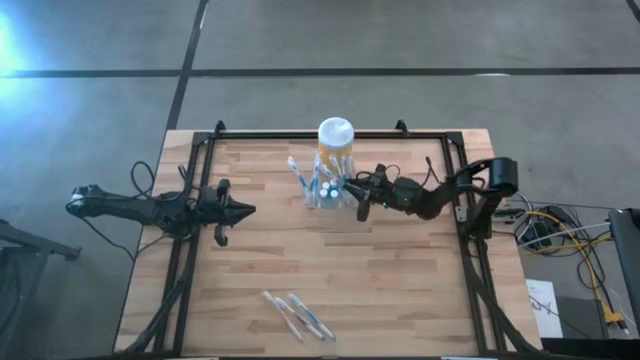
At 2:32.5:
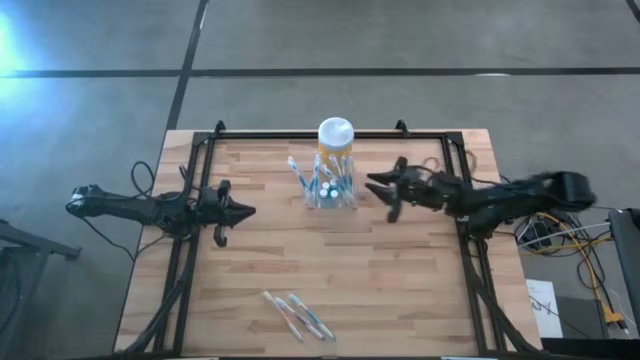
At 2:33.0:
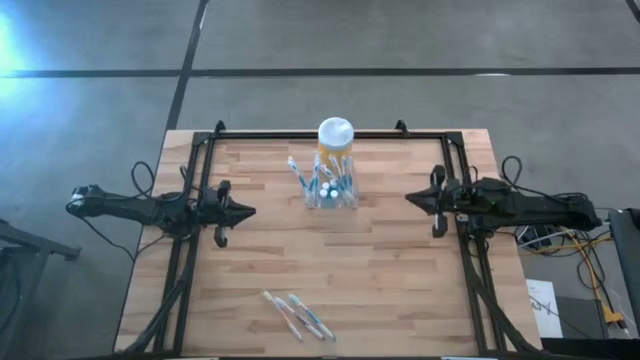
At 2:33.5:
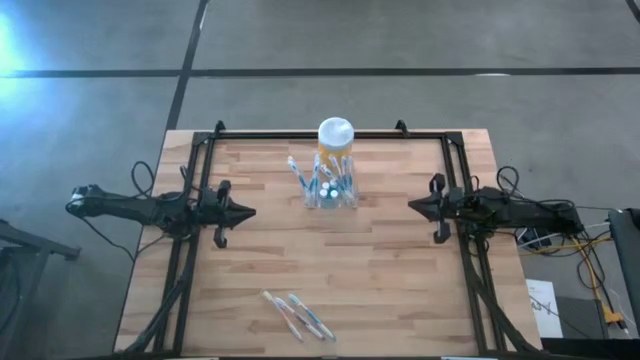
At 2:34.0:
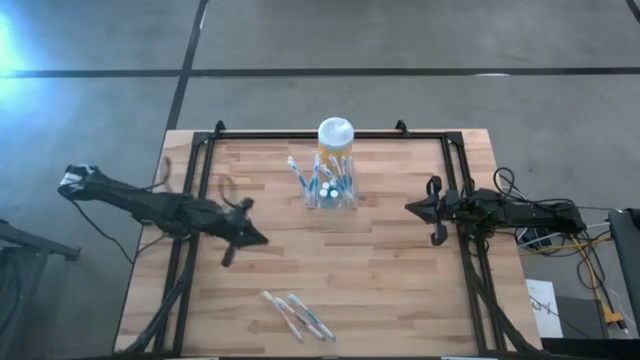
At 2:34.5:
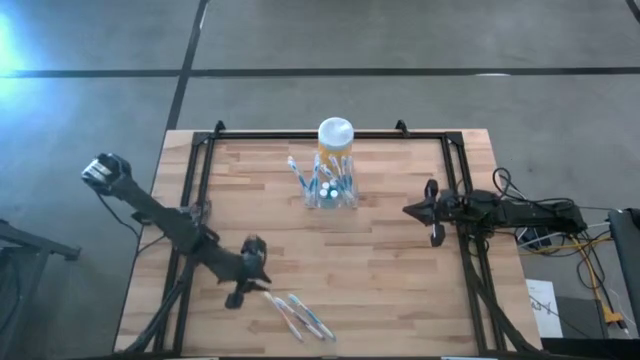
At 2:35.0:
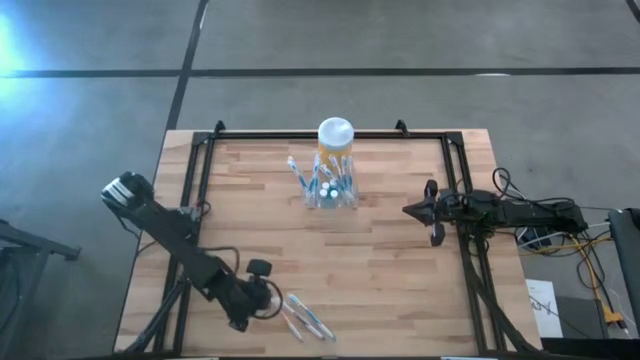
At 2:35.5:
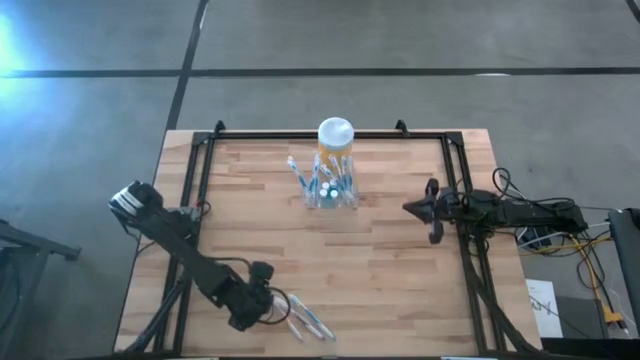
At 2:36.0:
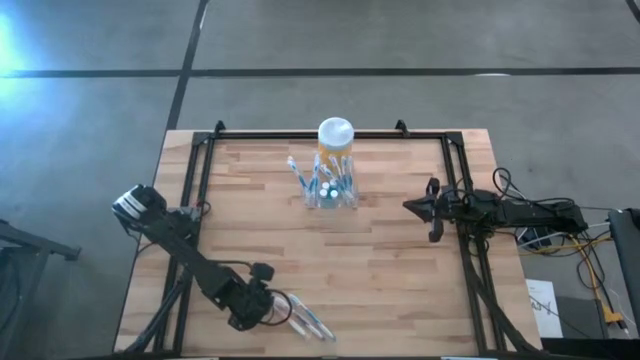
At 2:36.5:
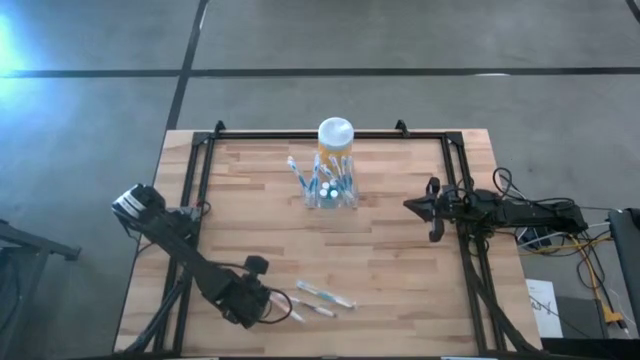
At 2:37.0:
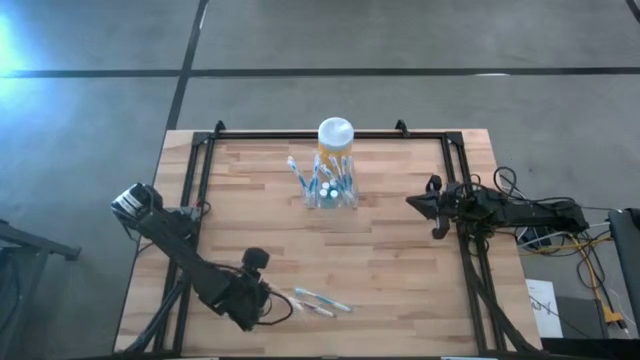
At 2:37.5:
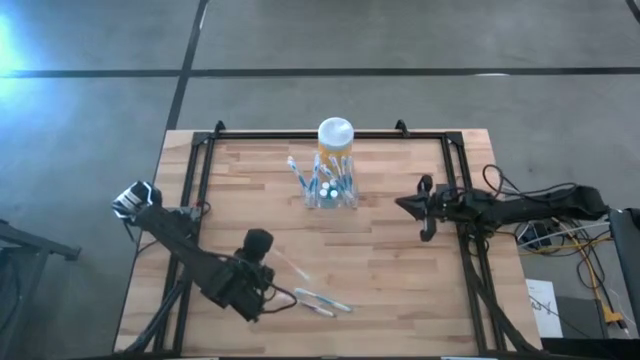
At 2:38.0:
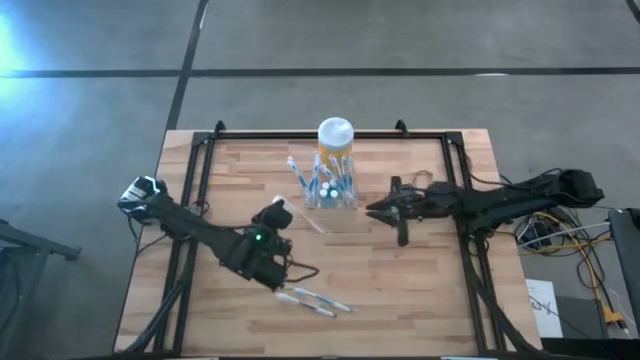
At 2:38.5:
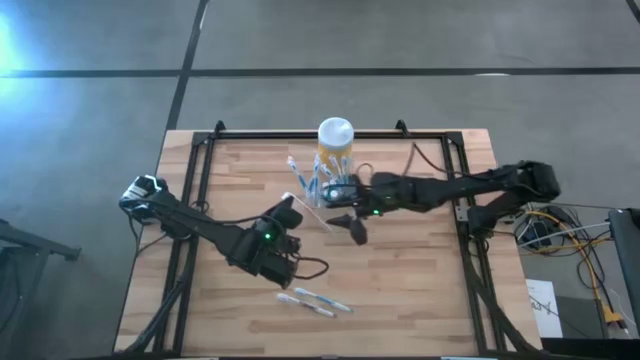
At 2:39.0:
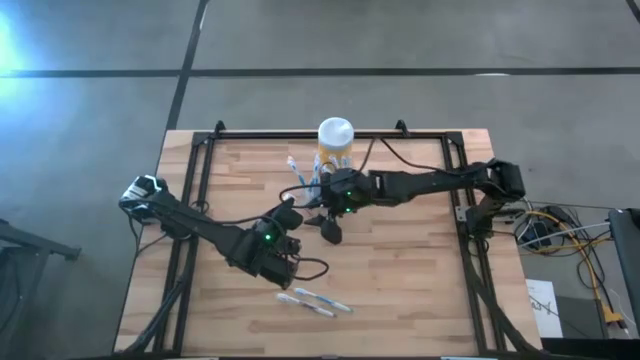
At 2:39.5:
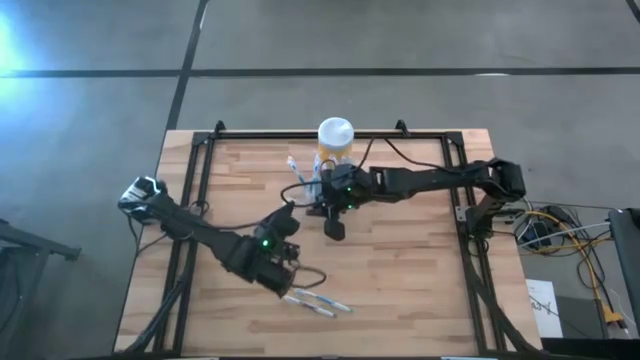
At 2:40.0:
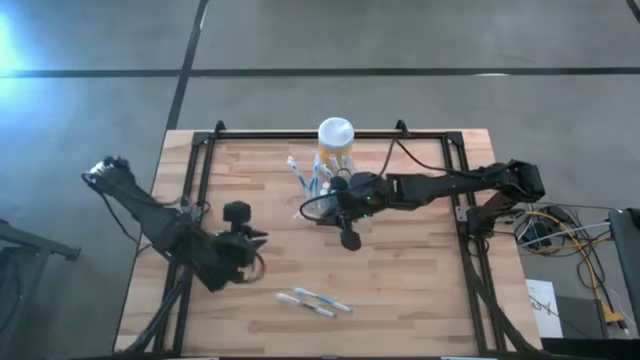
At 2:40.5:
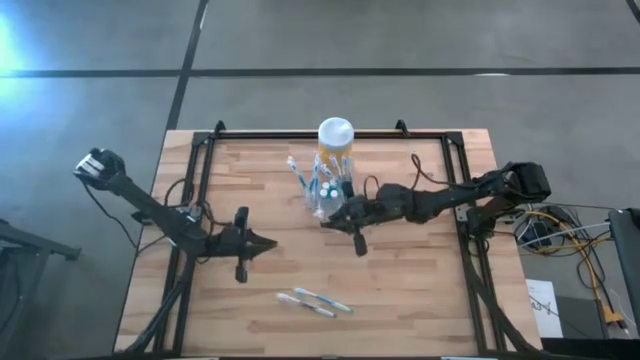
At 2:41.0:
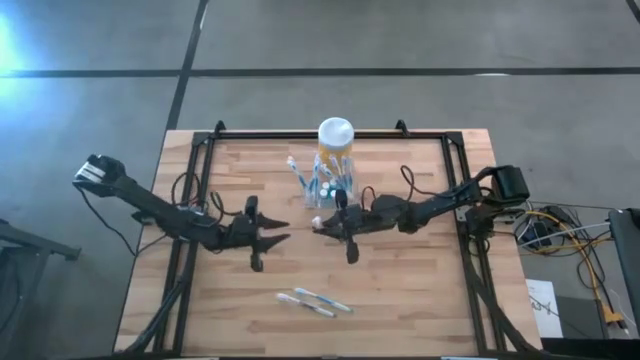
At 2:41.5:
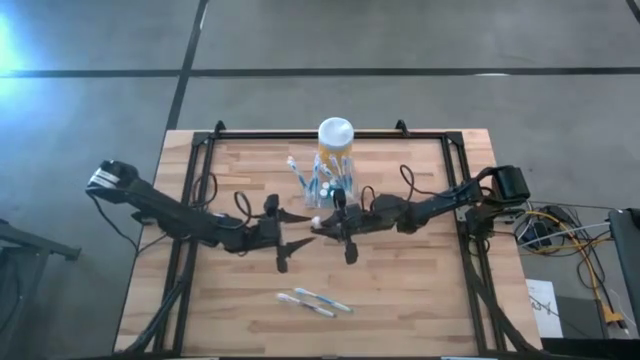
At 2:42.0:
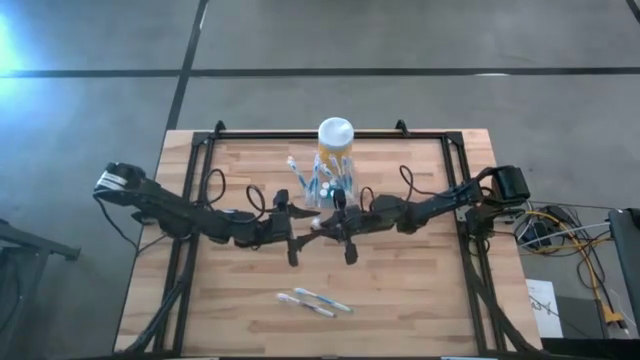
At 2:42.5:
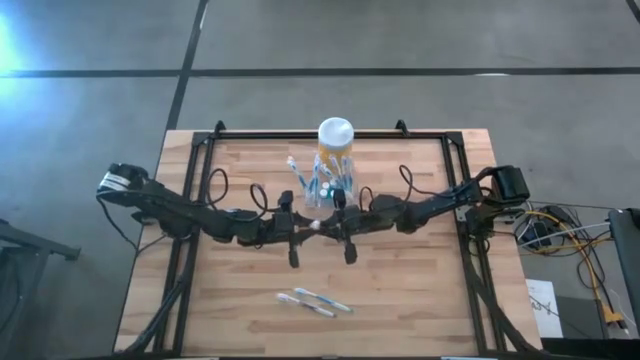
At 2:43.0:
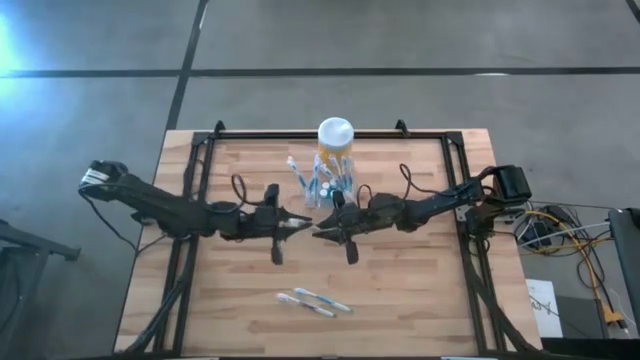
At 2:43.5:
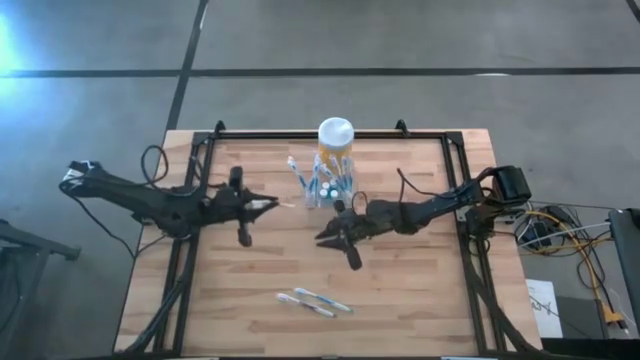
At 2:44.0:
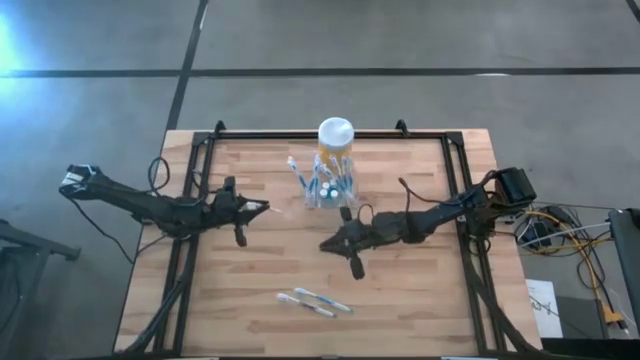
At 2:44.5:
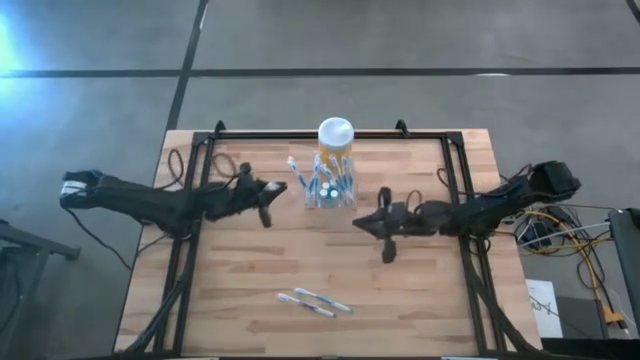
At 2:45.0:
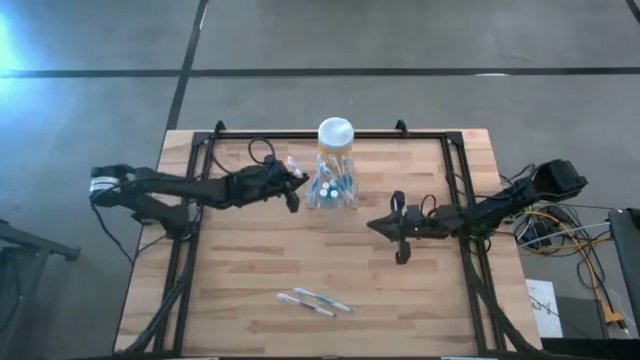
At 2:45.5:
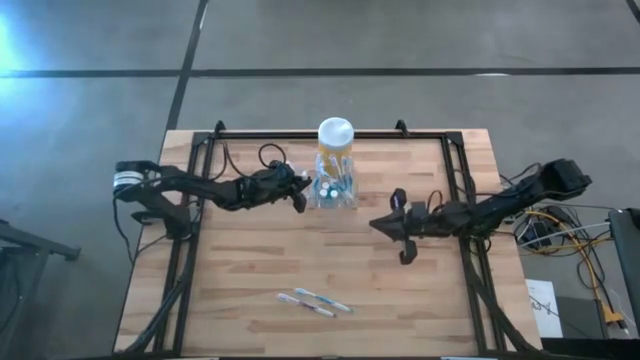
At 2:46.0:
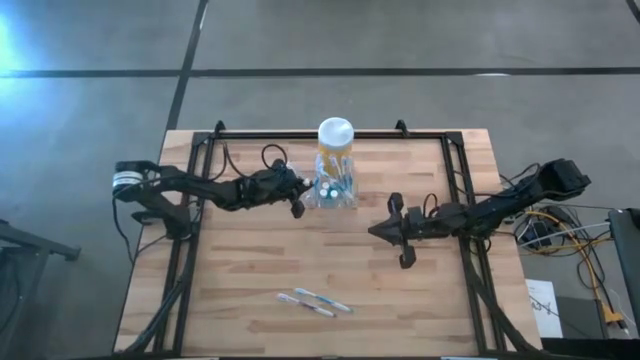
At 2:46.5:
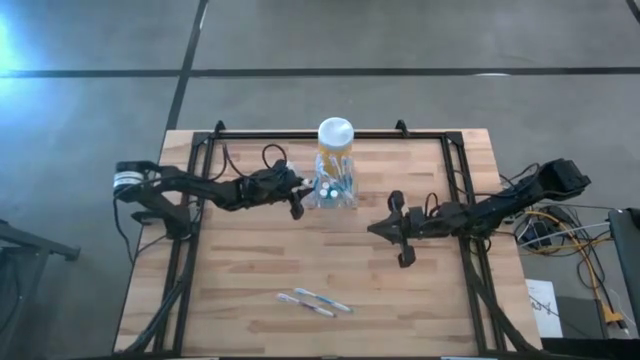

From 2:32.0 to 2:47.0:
Task: Pick & Place toothbrushing station
Put the orange toothbrush into the transparent organizer

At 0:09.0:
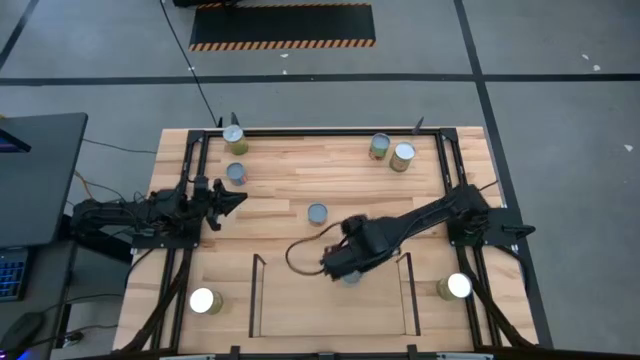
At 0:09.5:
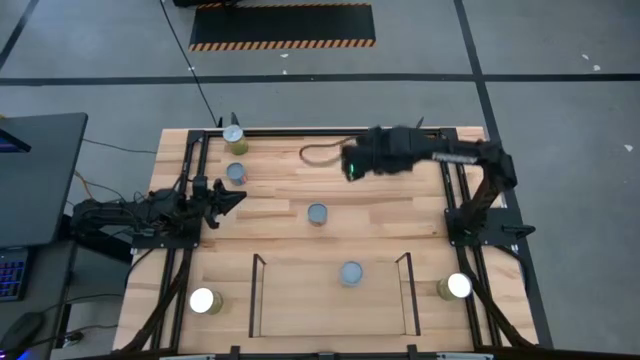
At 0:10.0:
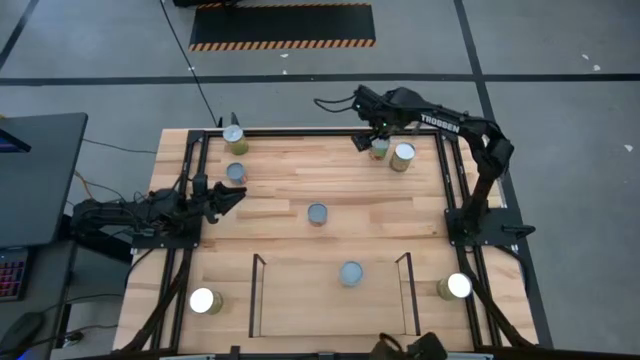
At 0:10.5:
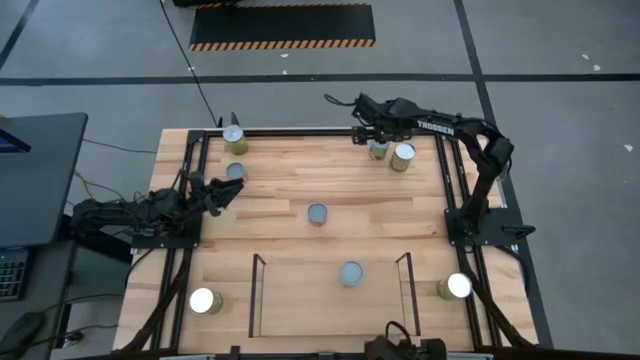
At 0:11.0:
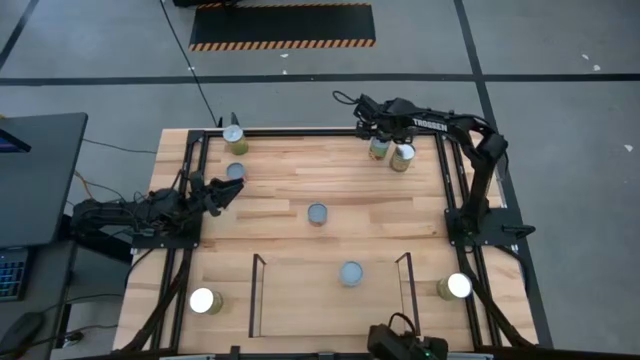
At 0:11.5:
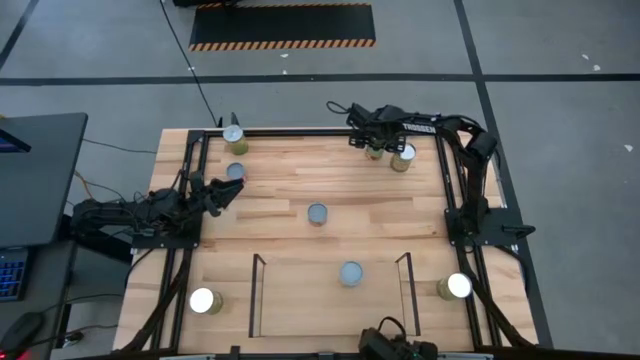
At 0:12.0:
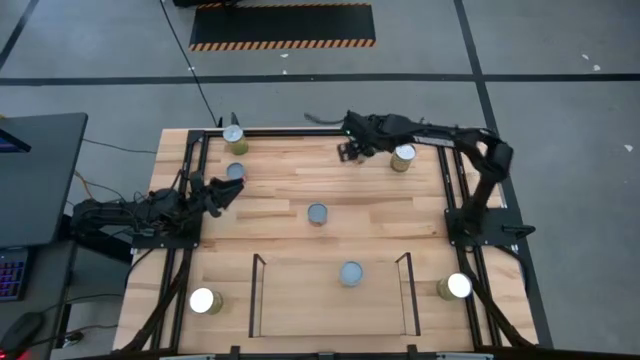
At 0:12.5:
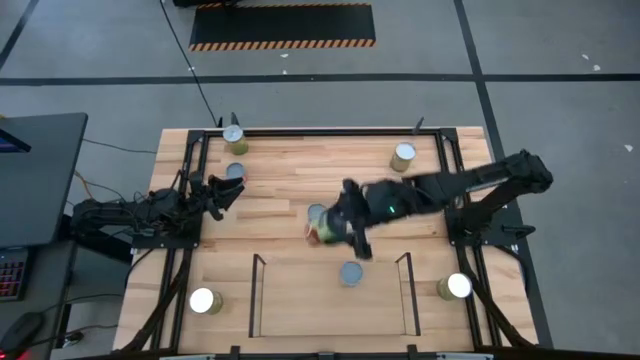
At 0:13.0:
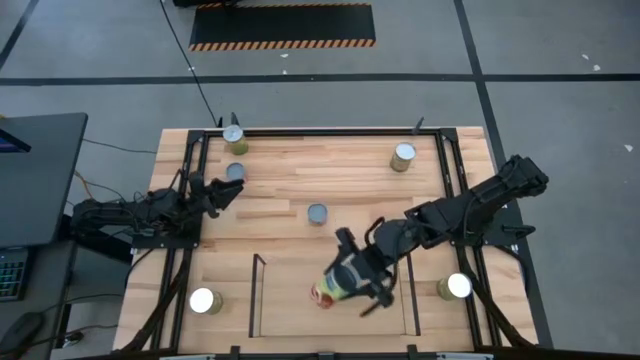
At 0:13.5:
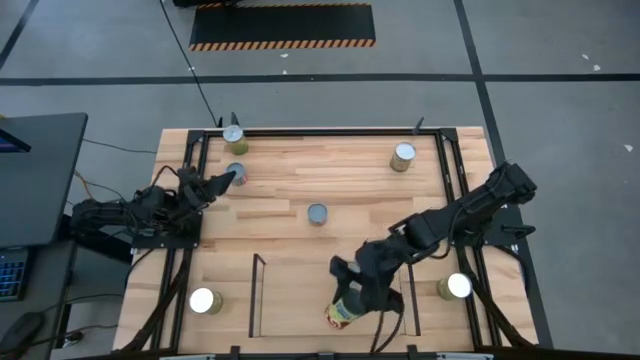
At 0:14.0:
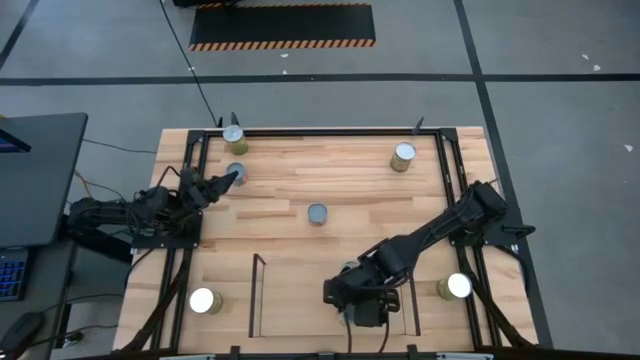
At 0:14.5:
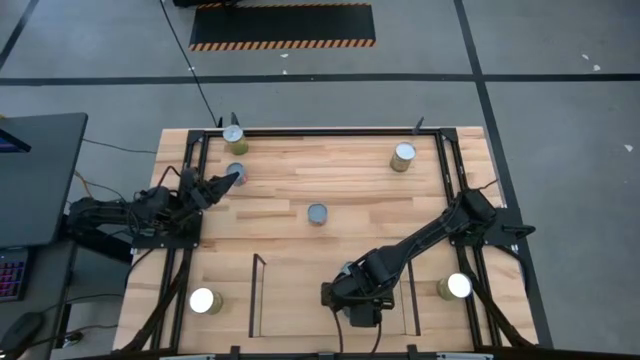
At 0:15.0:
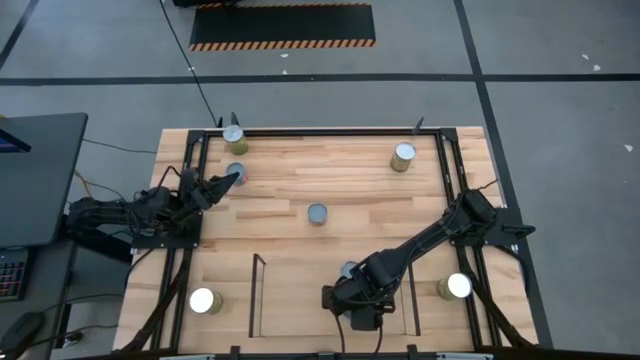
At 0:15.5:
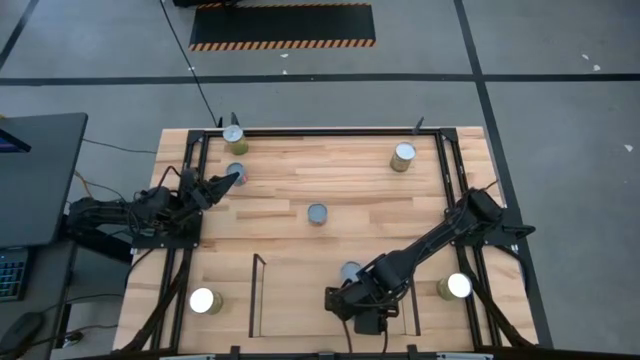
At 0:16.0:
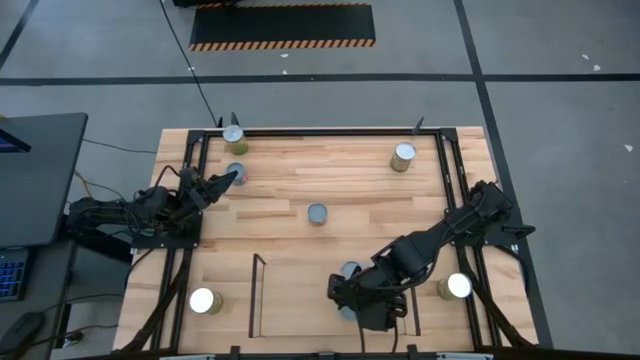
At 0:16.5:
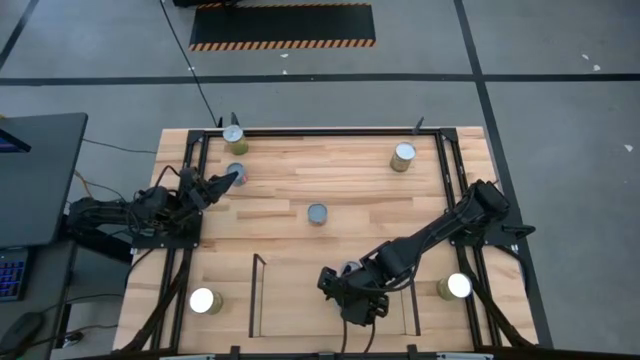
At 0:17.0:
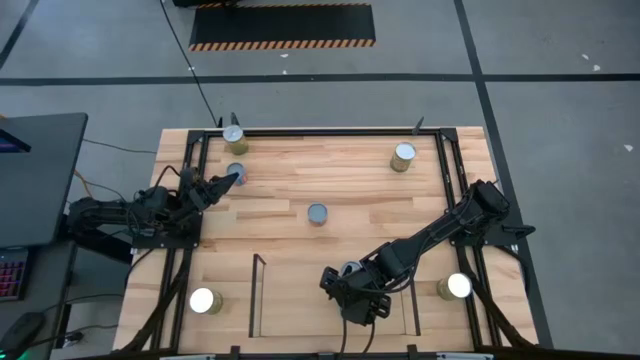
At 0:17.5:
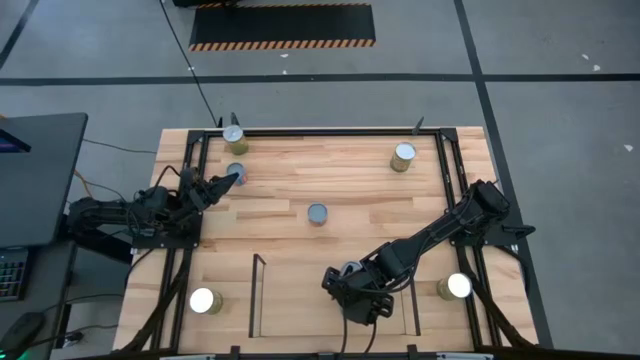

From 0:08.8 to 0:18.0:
Task: Pick and place cans onto a shelf
Put the canned spaghetti sauce on the shelf
